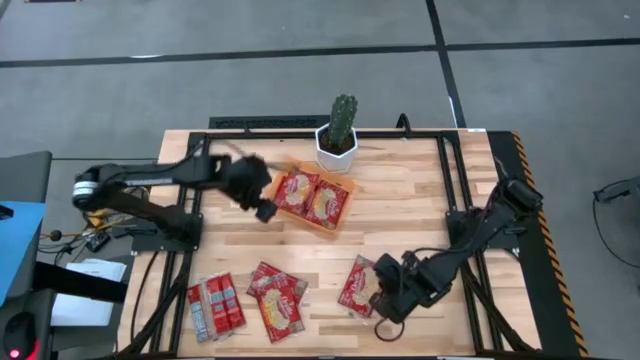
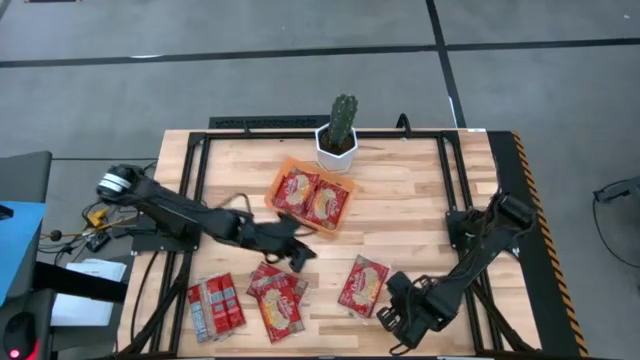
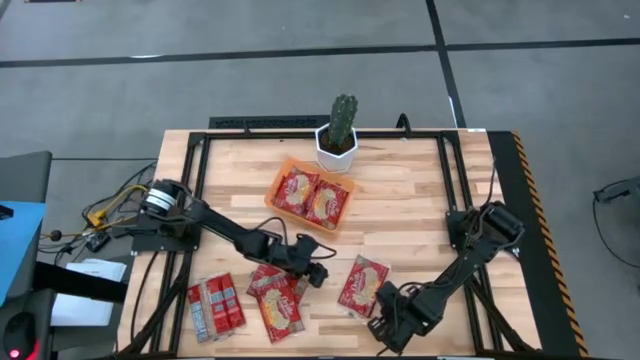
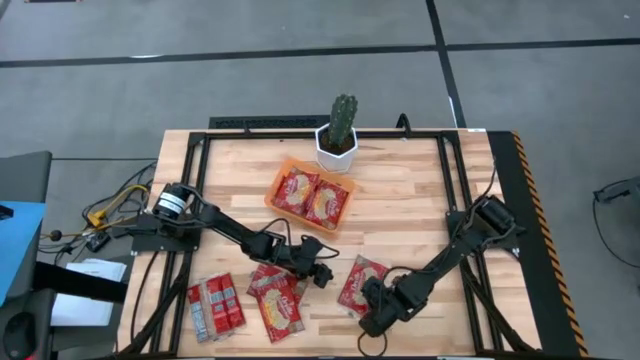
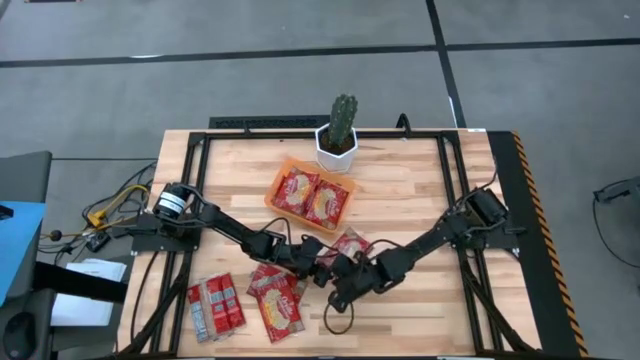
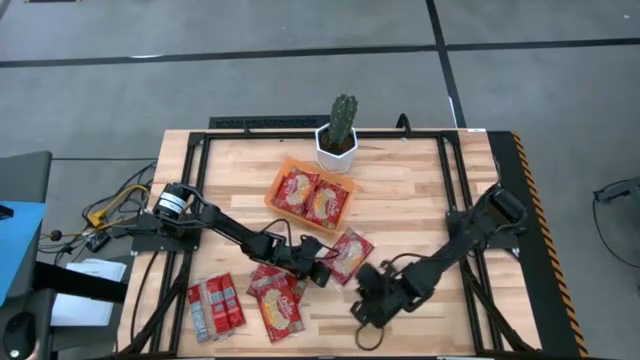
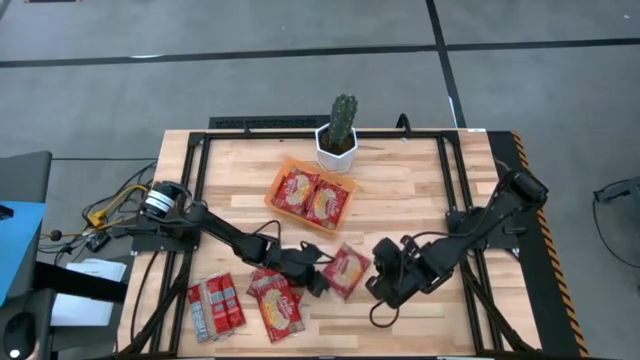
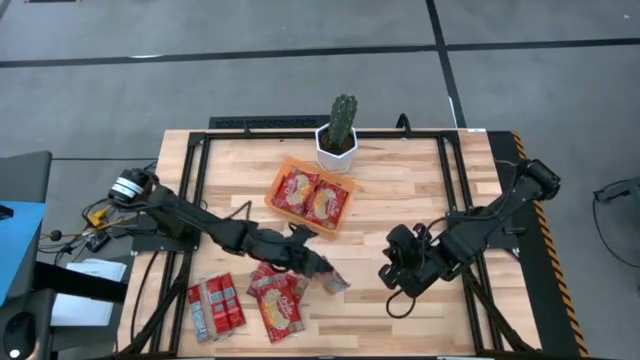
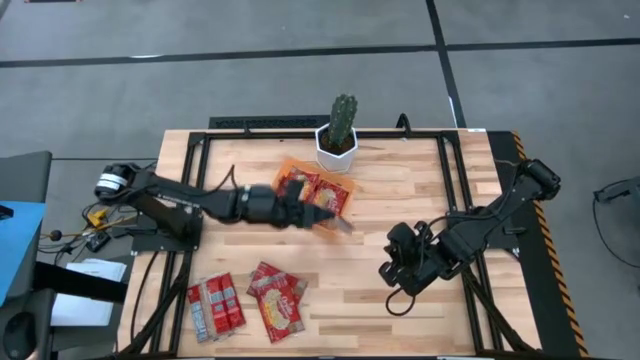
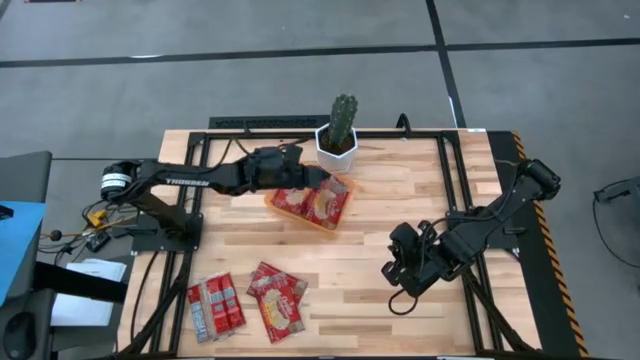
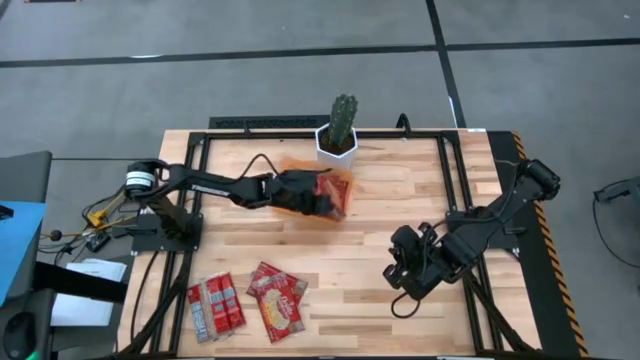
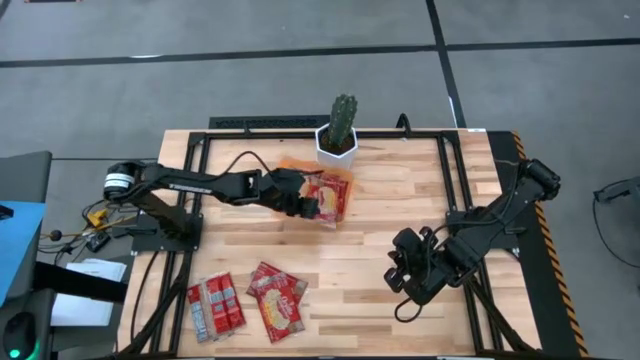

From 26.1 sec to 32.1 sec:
Task: Sort popcorn bags into baskets
Put the popcorn bag into the orange bin

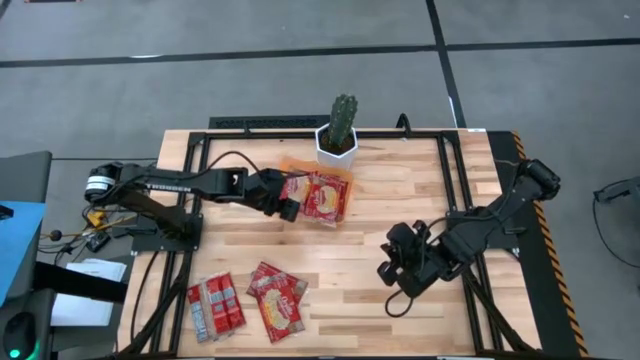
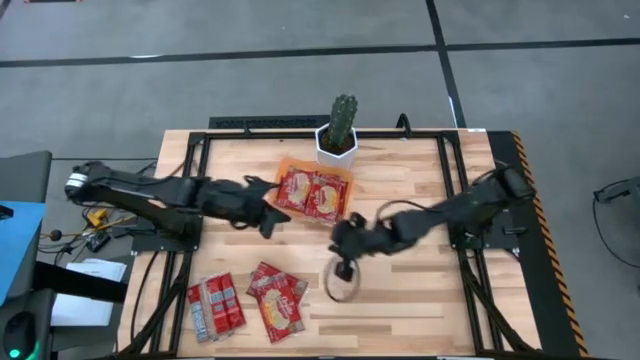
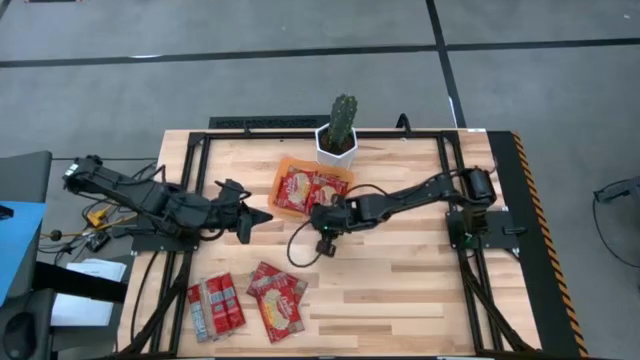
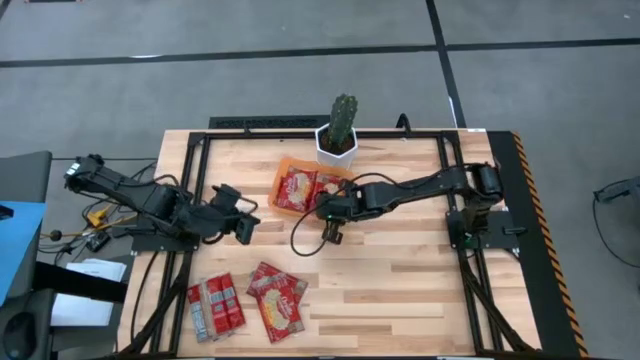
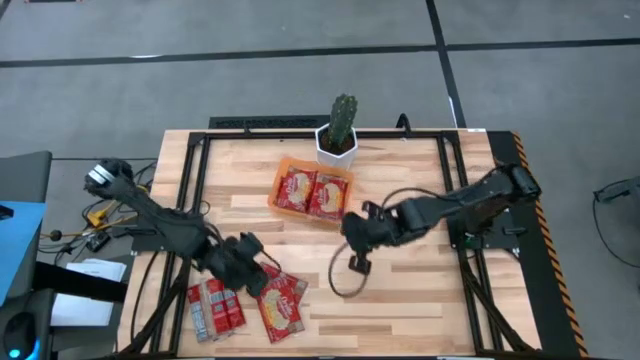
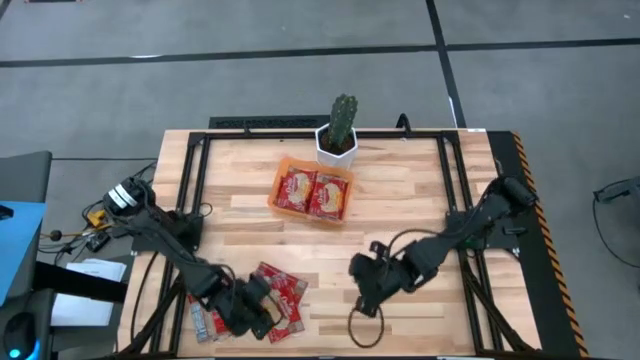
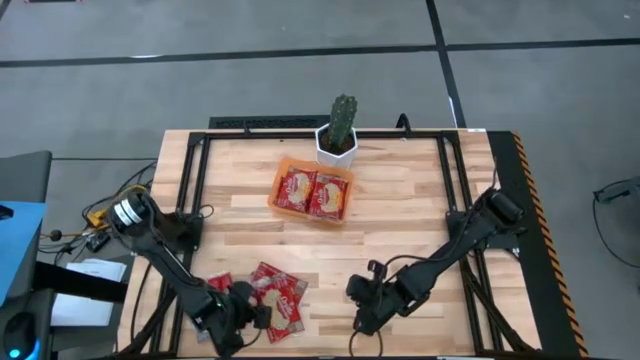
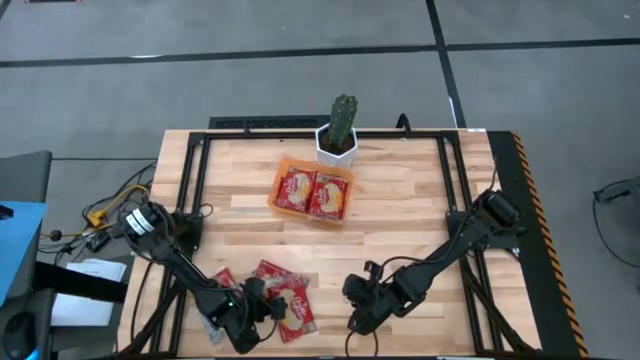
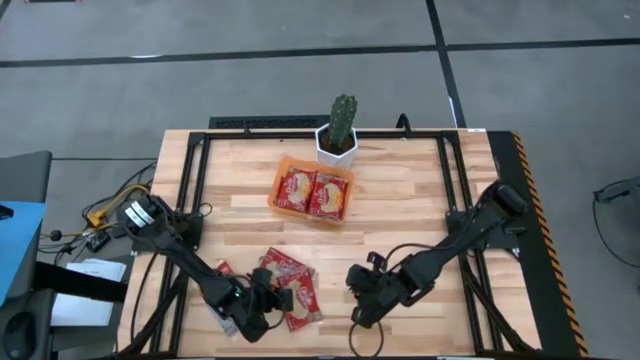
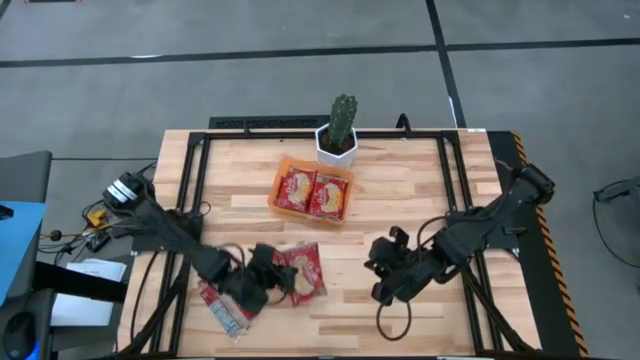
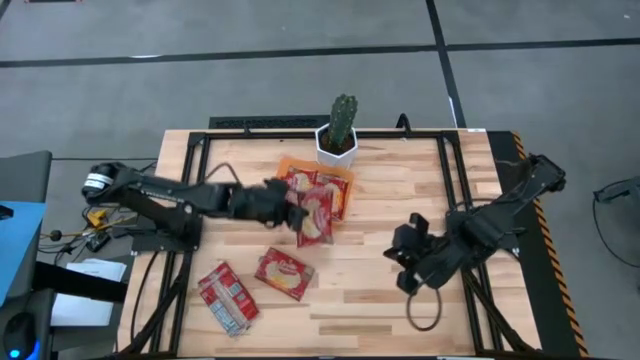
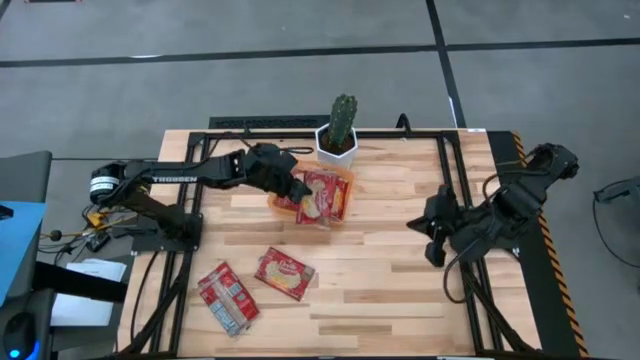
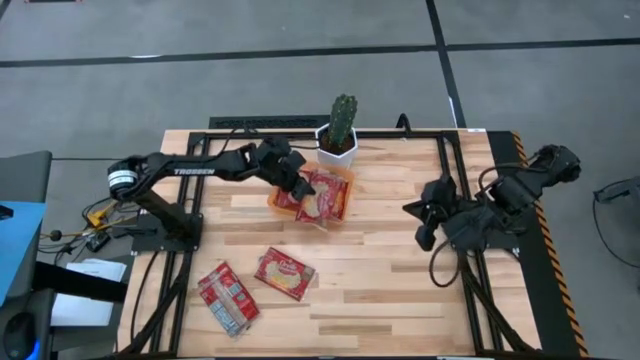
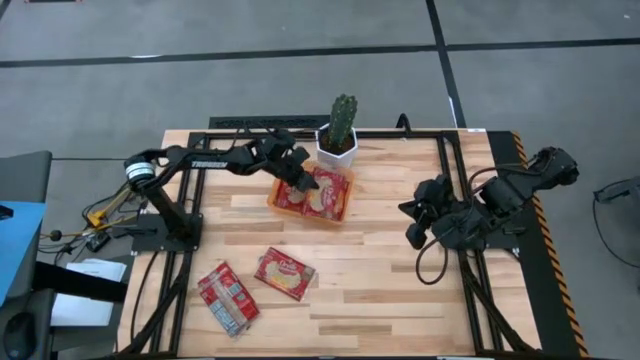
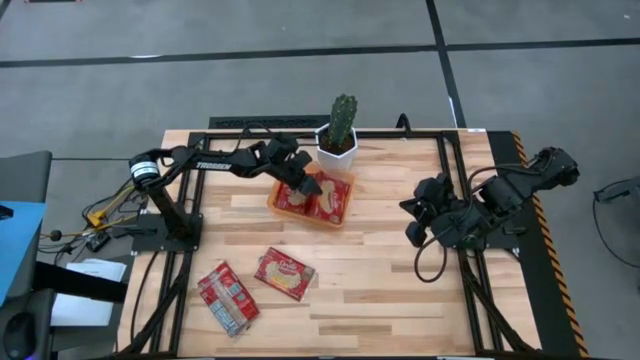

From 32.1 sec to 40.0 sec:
Put the popcorn bag into the orange bin

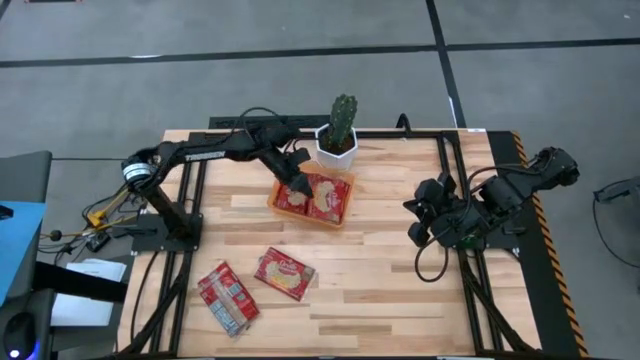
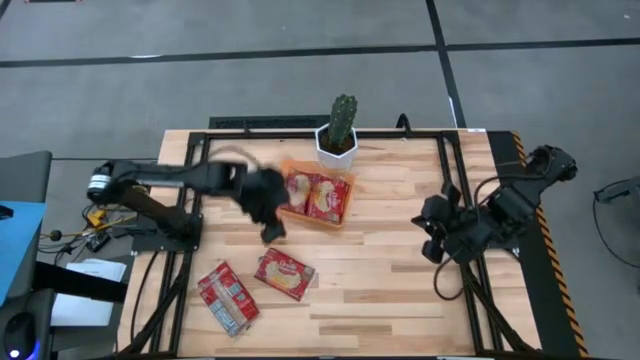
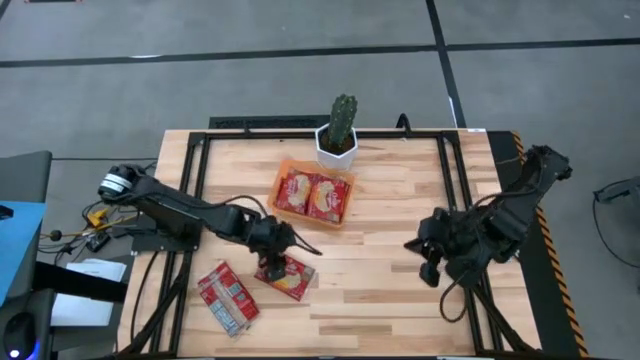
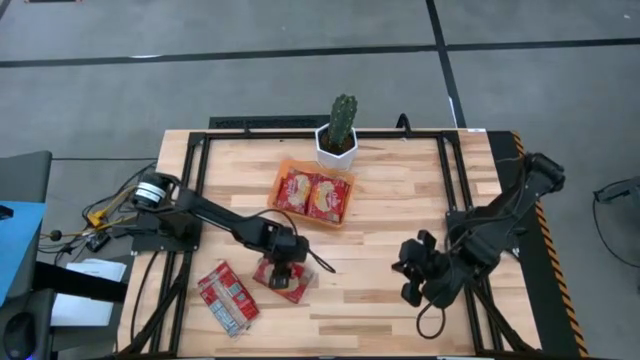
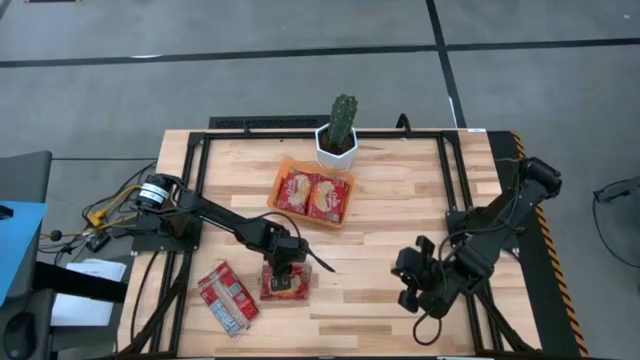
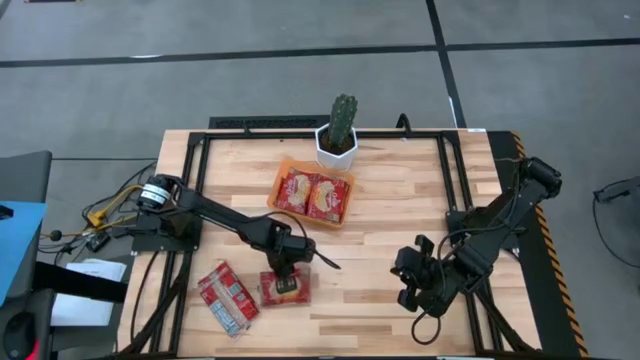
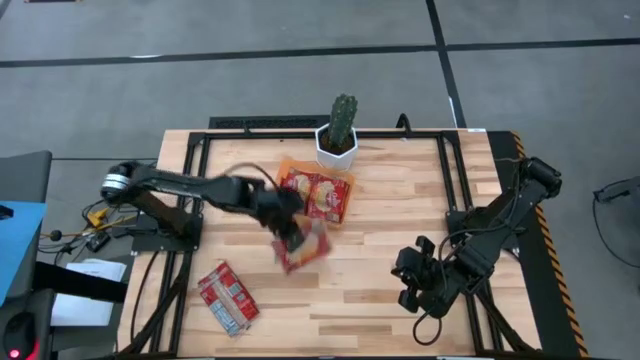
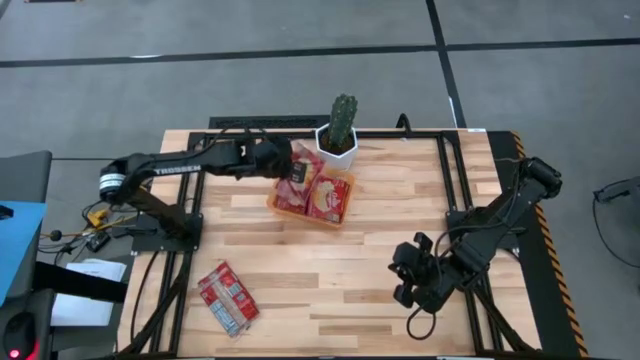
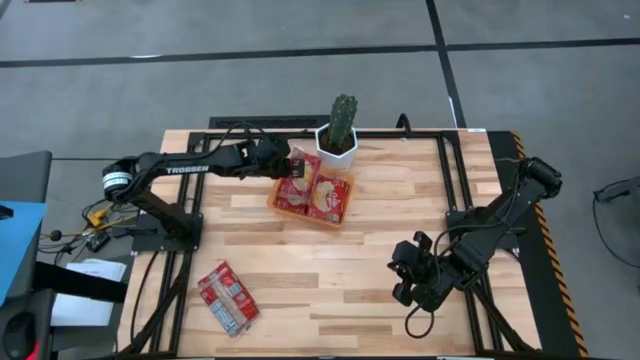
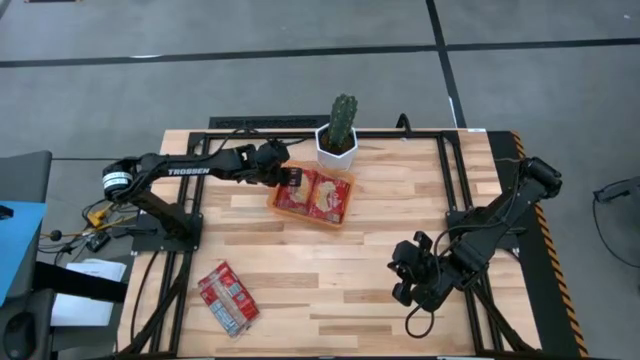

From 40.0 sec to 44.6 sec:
Put the popcorn bag into the orange bin

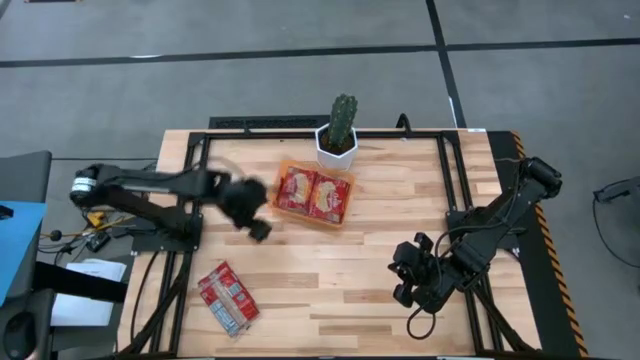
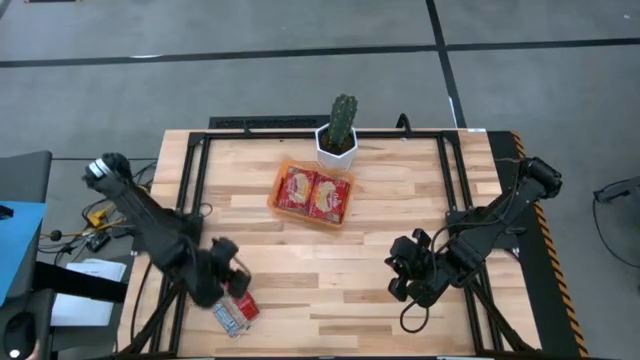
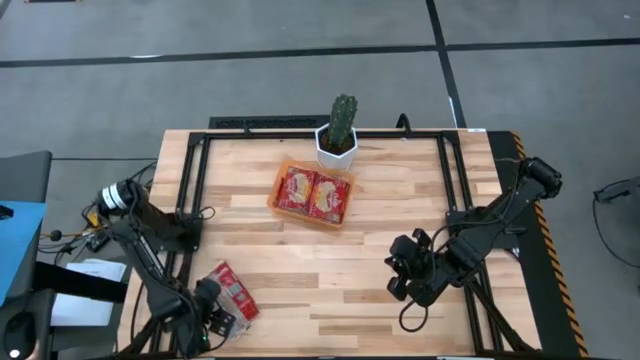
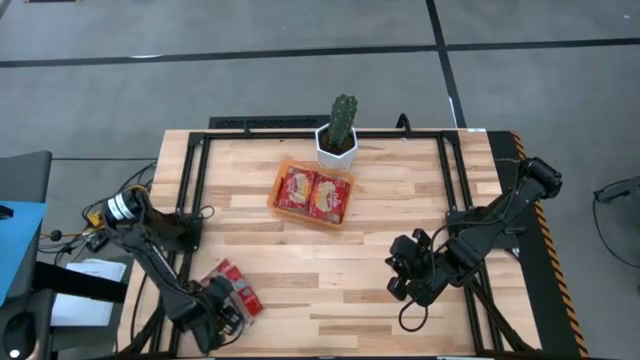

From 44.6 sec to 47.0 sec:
Move the popcorn bags from the bottom left to the center table
